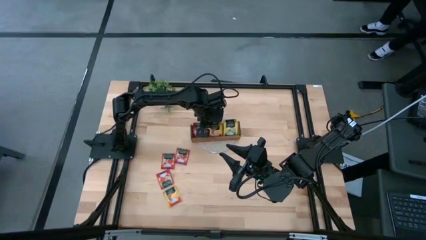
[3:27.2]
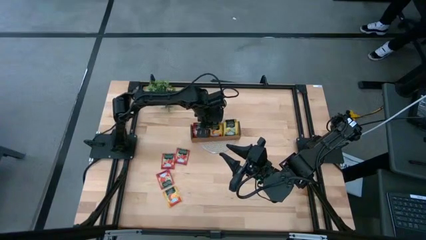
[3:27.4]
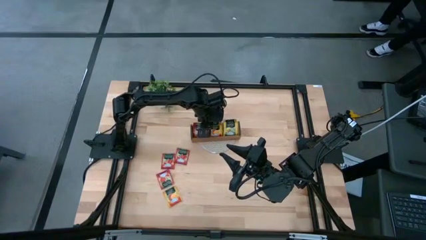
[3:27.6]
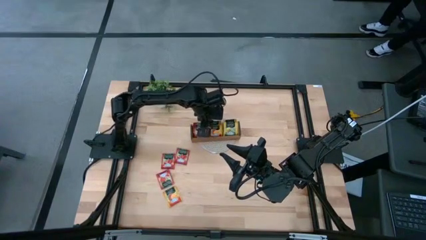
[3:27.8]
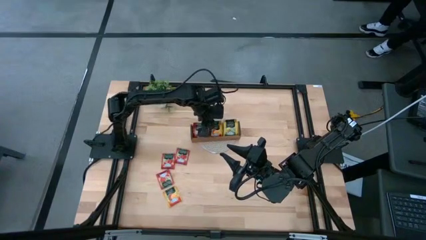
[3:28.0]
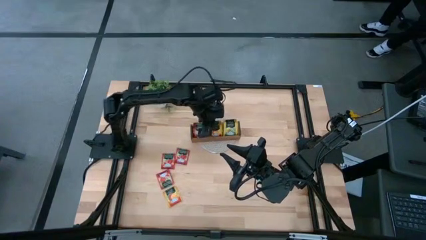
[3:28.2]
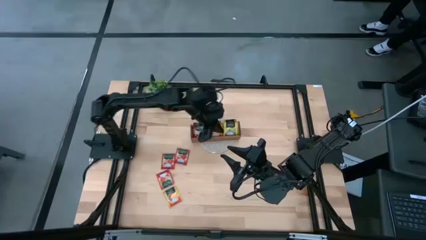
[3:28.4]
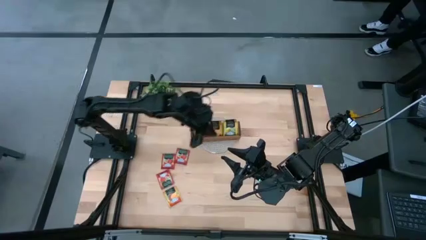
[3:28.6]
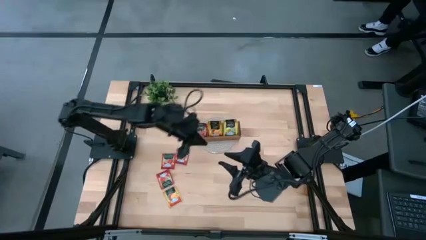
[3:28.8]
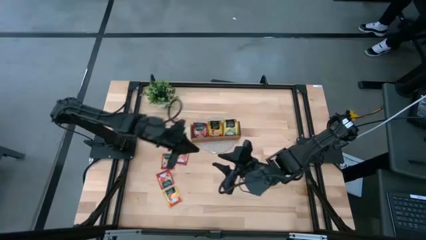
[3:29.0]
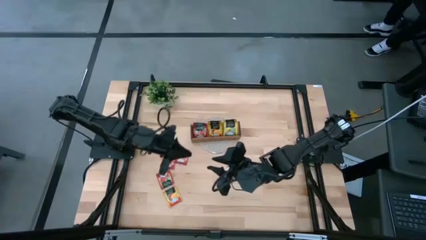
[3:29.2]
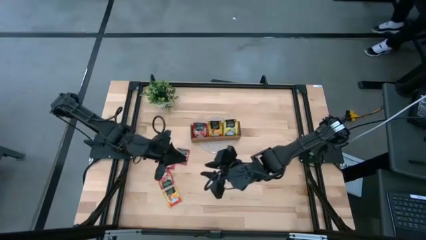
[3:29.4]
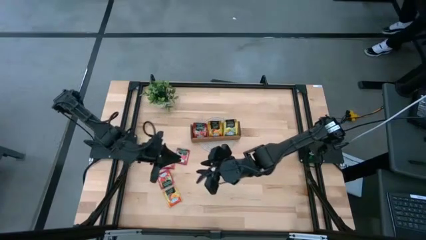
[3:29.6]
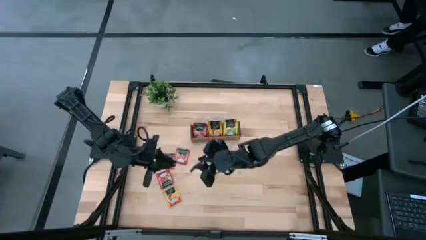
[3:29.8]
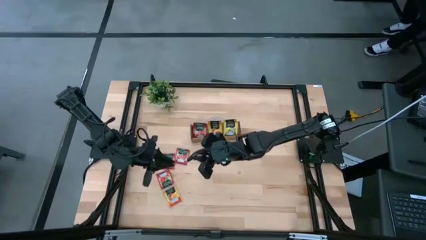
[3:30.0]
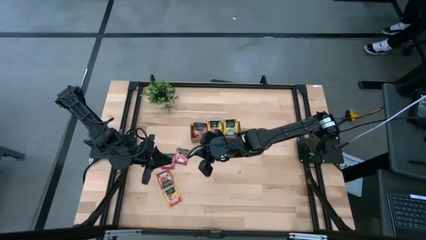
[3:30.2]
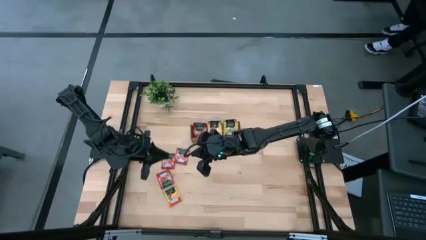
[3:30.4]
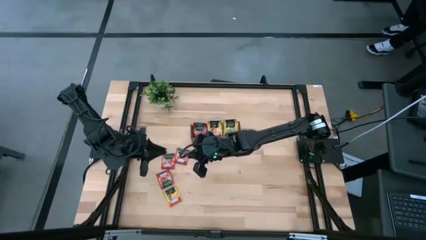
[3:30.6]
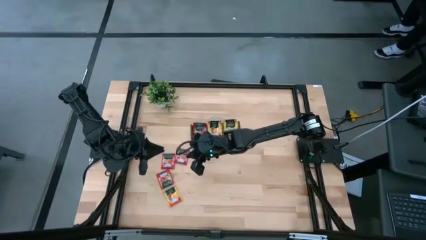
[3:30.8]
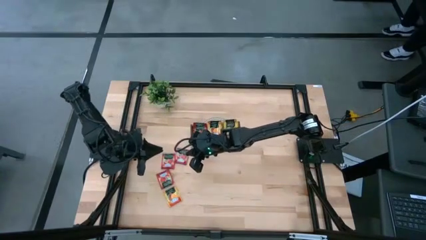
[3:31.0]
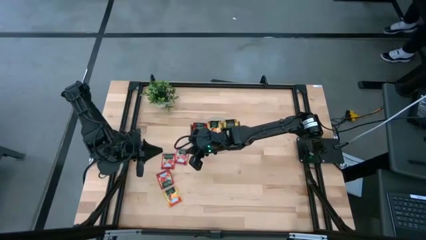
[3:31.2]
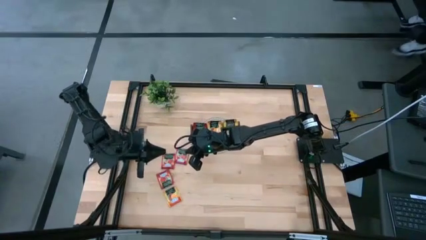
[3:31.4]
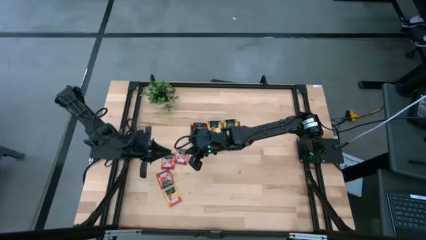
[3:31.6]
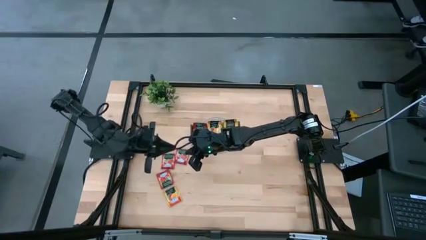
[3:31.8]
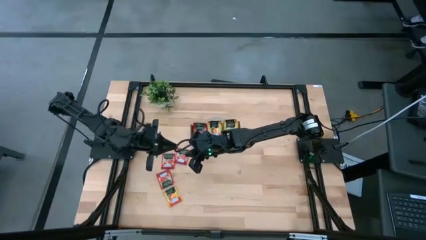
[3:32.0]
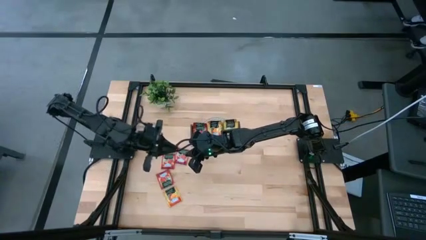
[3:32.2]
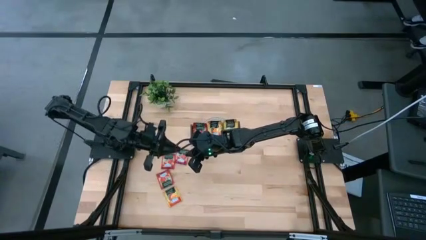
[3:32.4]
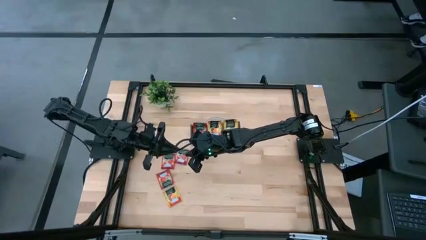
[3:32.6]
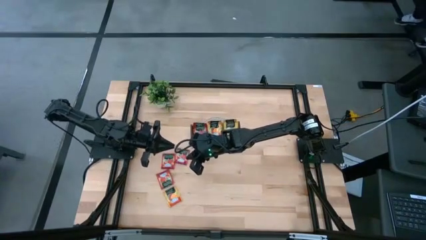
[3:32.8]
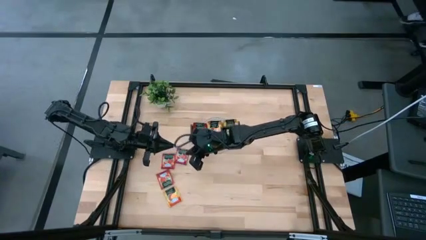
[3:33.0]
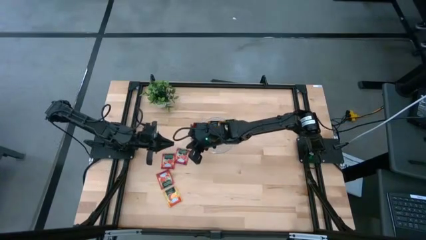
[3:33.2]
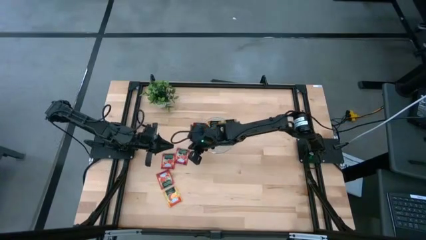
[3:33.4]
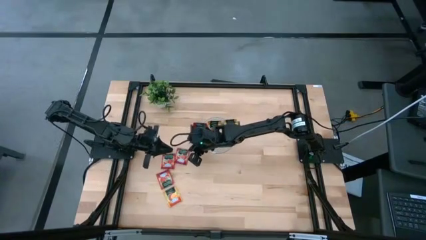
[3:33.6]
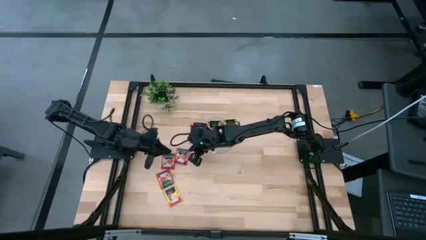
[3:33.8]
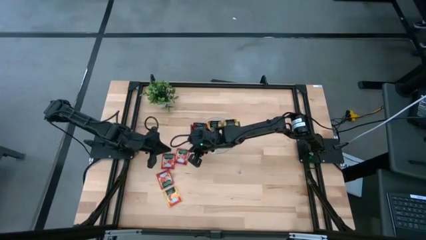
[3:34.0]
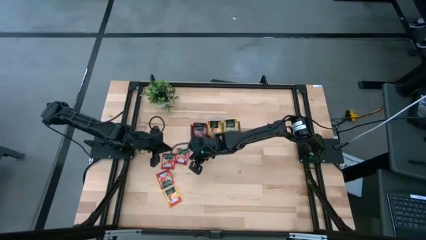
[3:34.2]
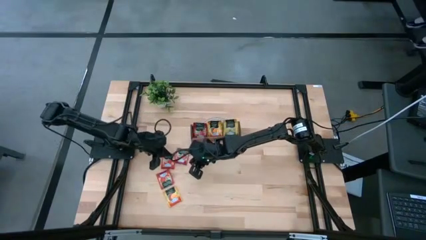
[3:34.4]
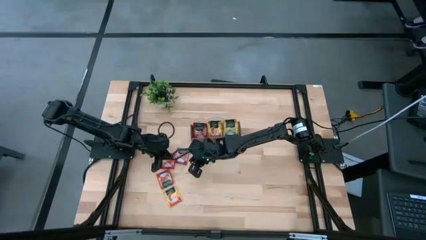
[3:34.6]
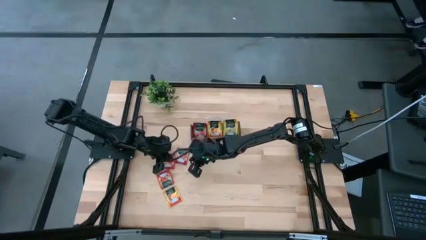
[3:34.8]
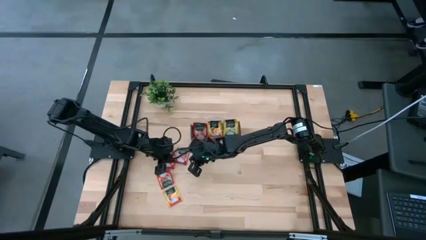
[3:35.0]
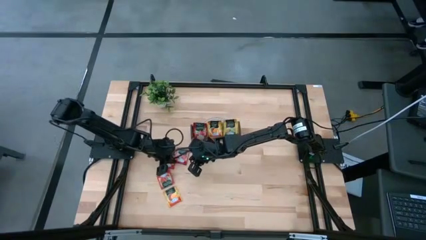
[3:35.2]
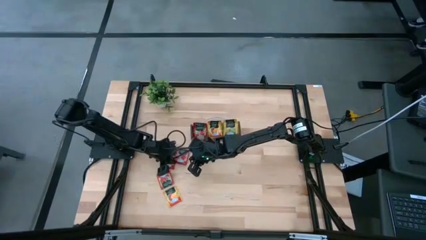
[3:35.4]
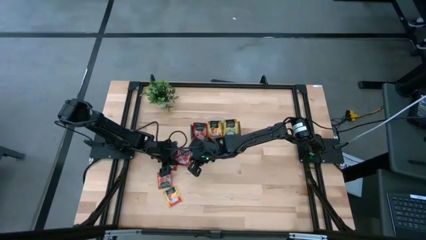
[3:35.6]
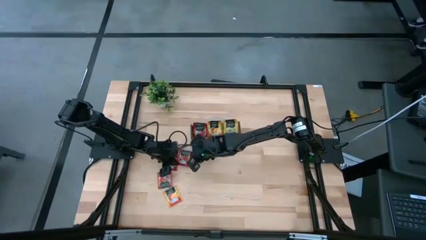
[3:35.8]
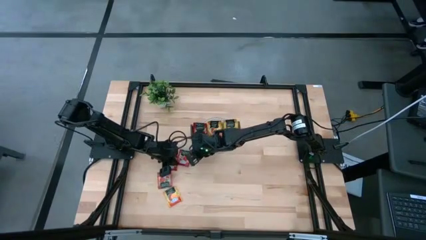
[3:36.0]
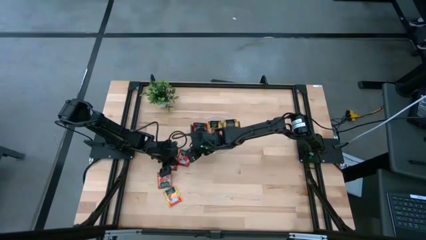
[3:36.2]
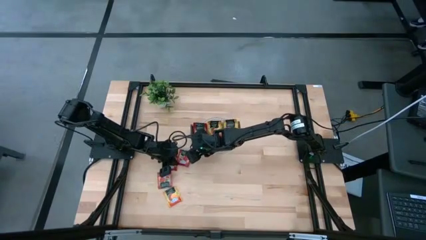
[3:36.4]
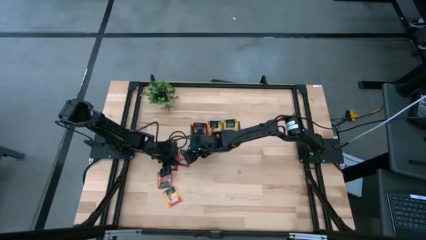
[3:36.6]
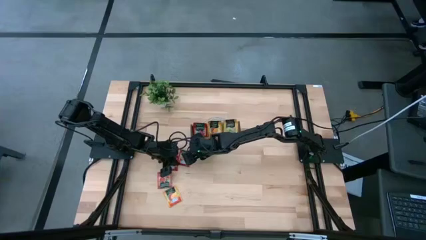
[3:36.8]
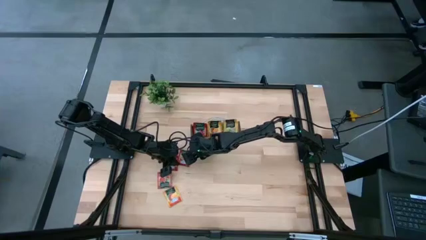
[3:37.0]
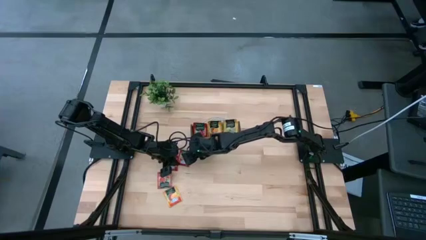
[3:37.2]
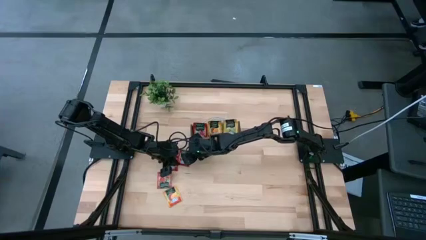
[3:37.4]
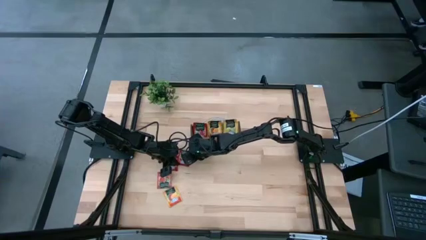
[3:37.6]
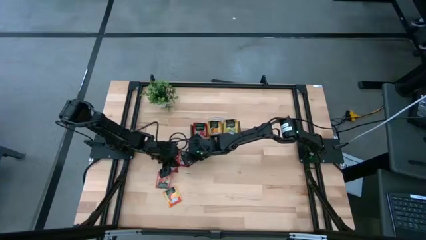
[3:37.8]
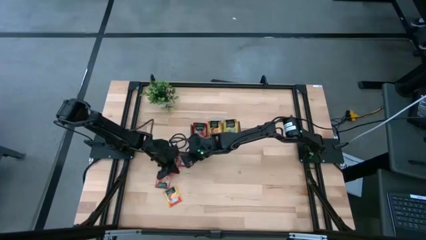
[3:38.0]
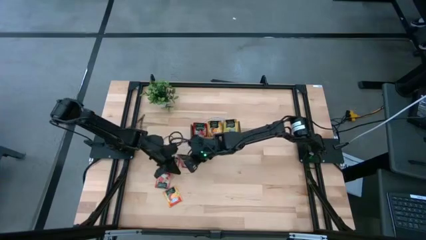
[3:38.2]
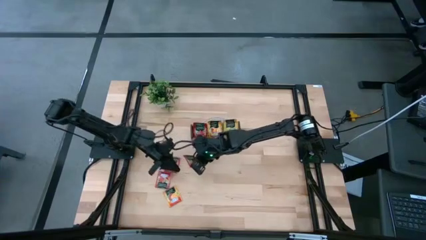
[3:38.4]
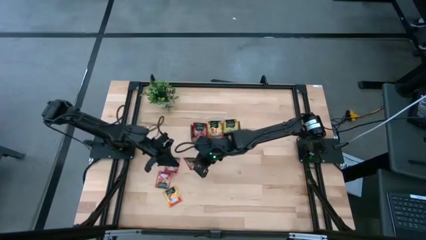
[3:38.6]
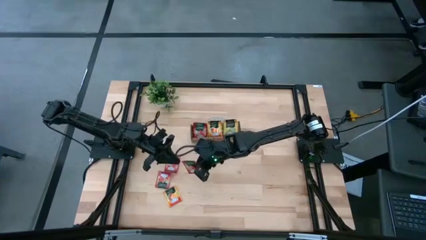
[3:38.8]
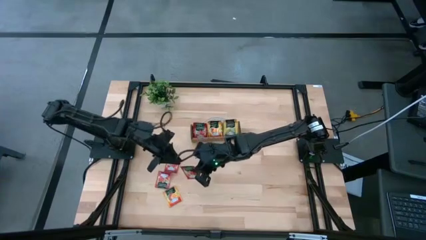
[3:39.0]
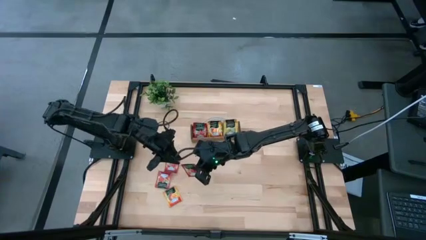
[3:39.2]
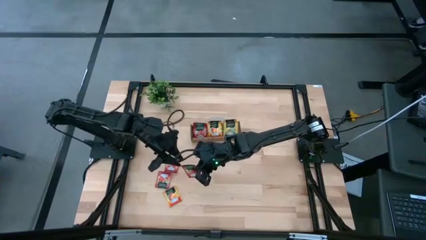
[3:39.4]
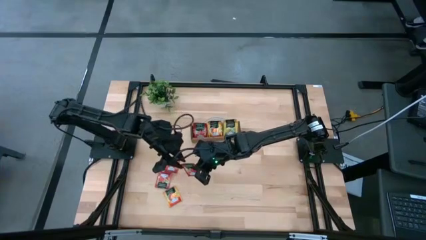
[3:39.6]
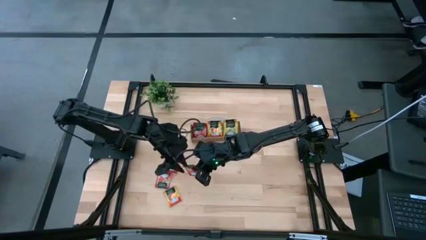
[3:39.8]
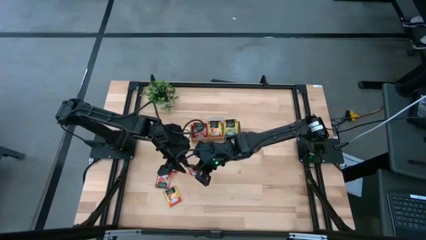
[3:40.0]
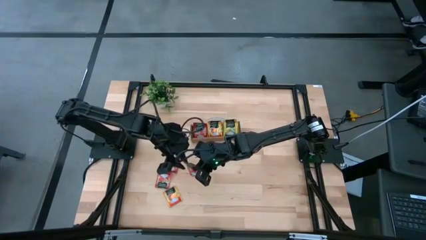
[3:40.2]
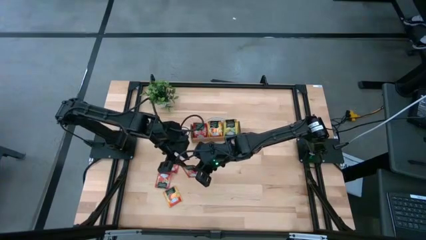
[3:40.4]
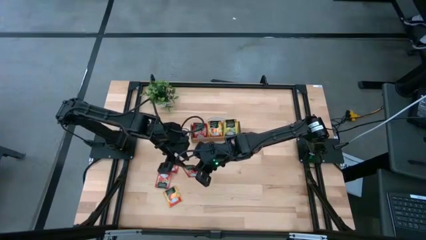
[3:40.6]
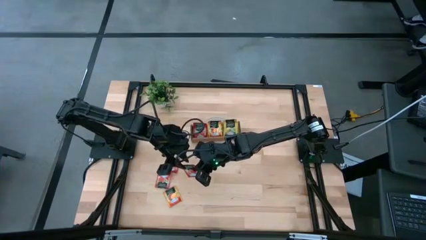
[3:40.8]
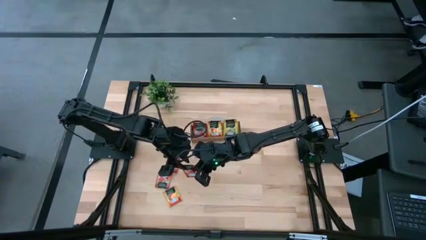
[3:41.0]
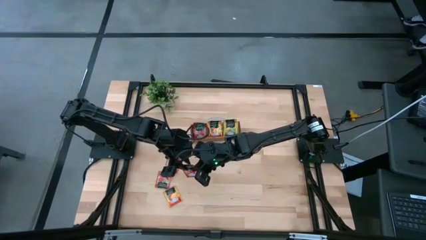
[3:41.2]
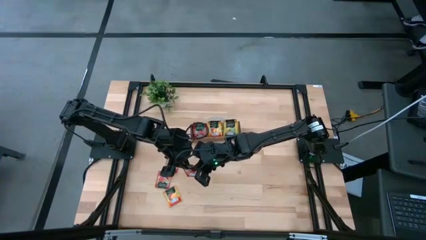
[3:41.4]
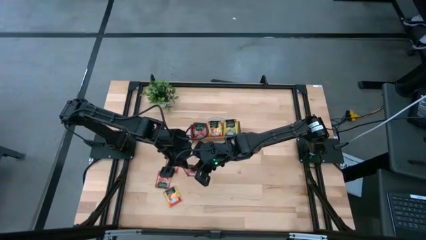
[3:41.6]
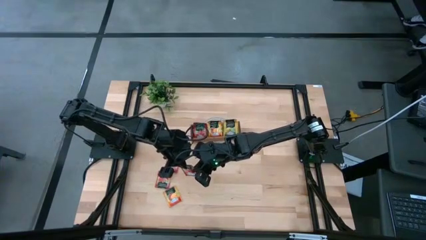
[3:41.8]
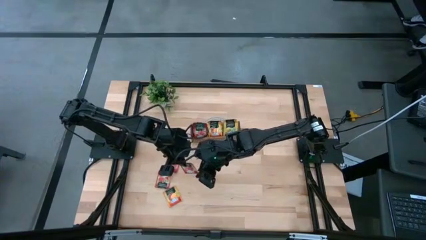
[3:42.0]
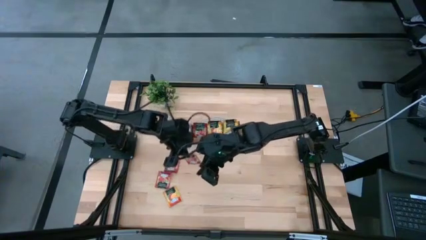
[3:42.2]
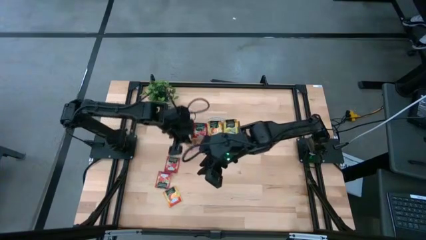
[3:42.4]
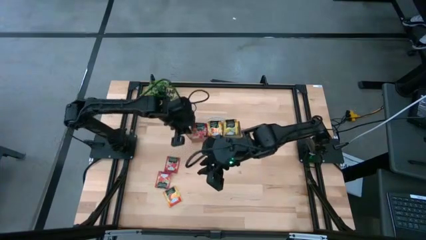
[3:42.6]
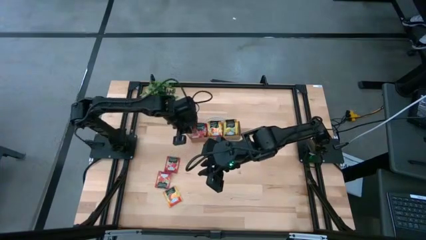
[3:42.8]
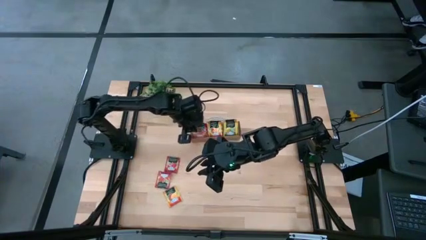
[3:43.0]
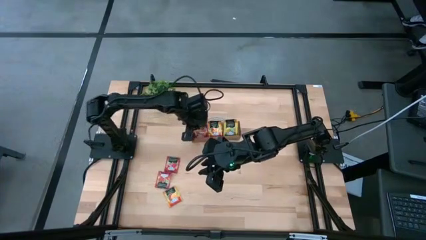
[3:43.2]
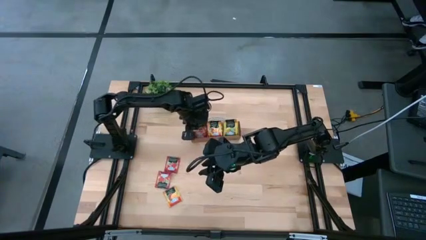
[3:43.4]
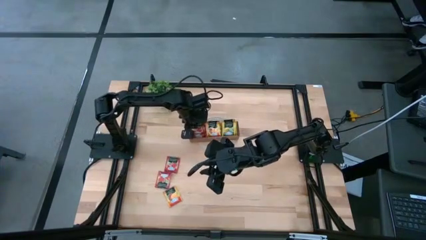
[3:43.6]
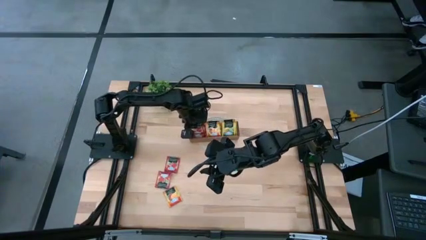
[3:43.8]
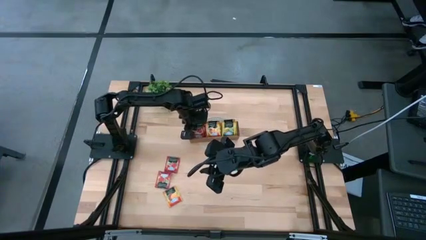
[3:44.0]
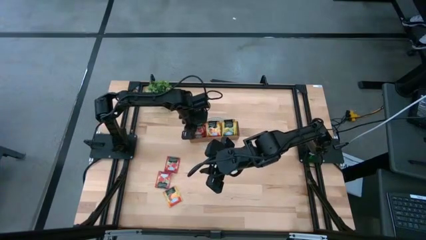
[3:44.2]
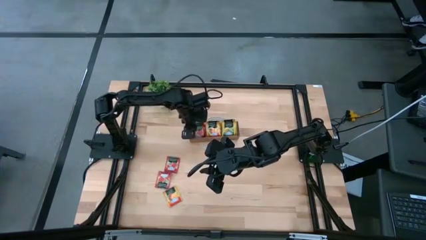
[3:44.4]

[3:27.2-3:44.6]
Task: Pick & Place Tea
Put the red tea bag into the left section of the wooden organizer
